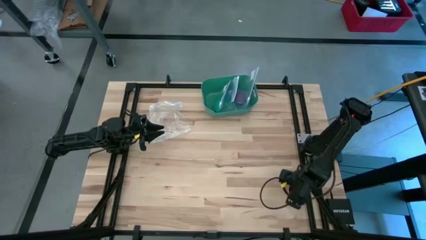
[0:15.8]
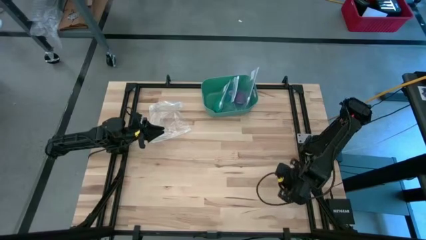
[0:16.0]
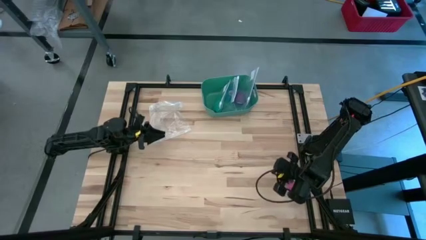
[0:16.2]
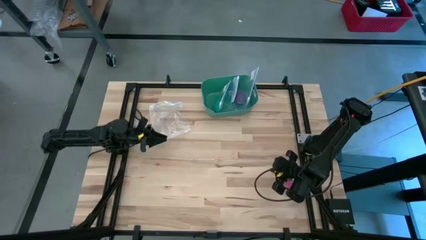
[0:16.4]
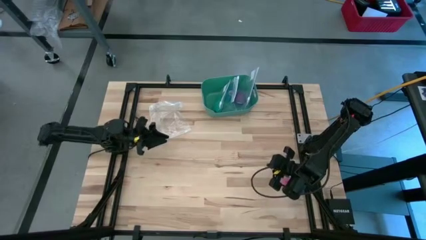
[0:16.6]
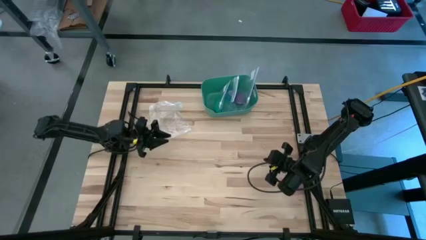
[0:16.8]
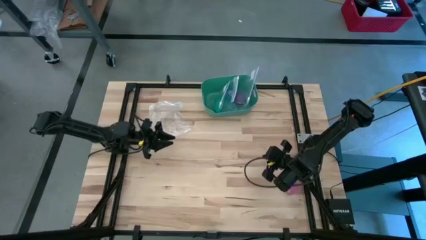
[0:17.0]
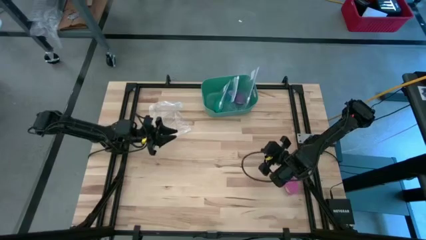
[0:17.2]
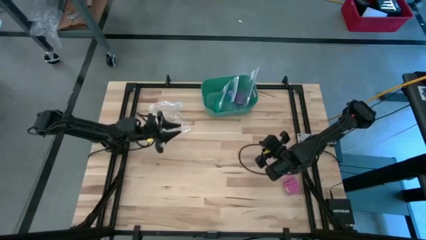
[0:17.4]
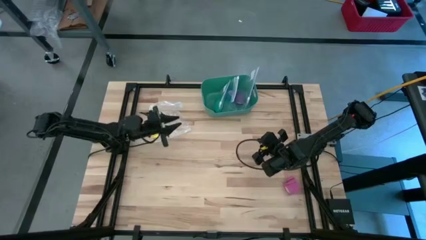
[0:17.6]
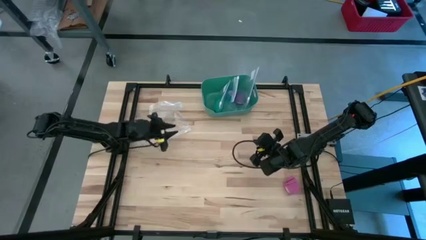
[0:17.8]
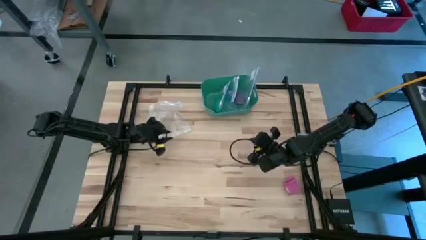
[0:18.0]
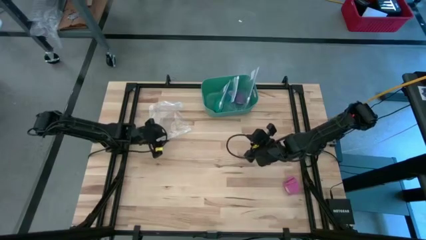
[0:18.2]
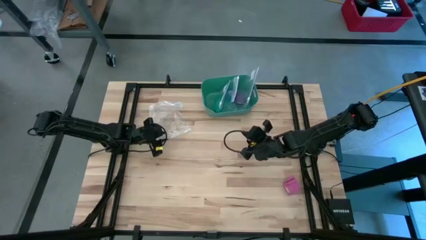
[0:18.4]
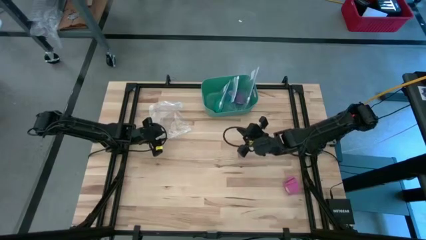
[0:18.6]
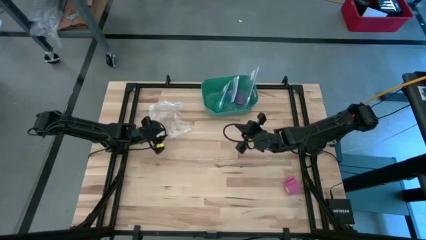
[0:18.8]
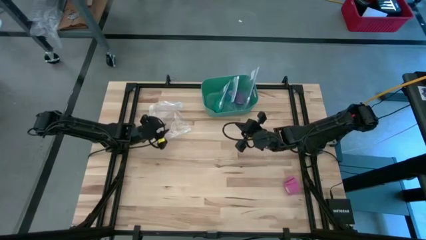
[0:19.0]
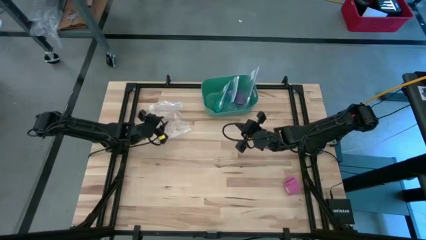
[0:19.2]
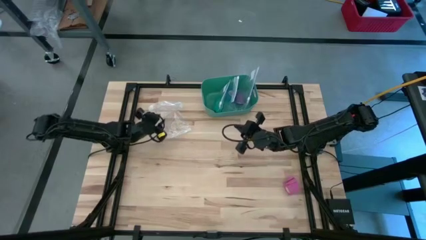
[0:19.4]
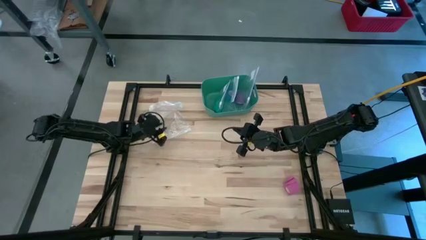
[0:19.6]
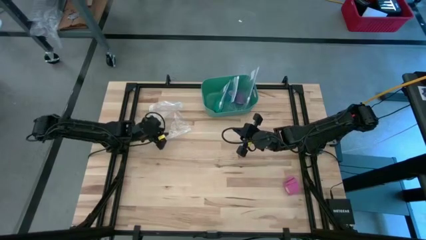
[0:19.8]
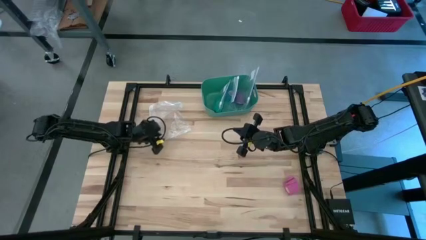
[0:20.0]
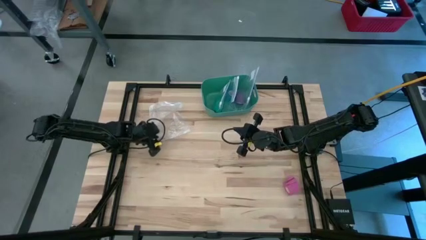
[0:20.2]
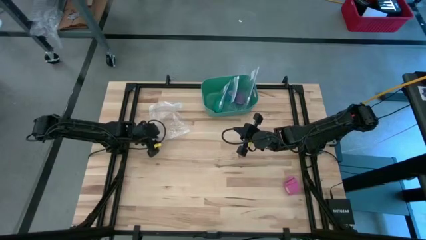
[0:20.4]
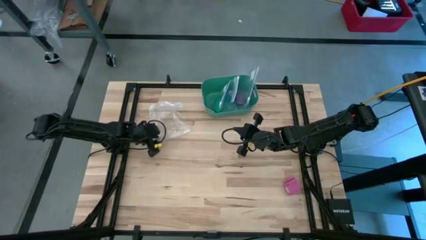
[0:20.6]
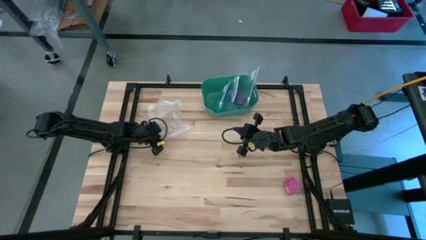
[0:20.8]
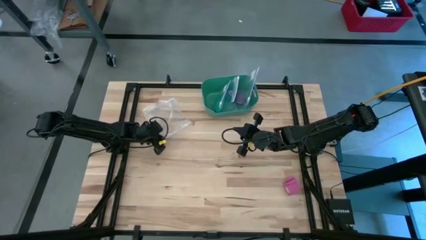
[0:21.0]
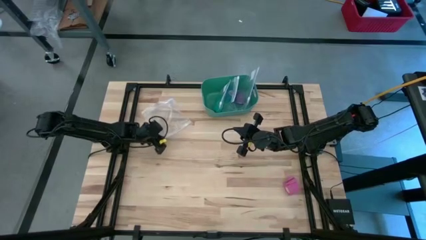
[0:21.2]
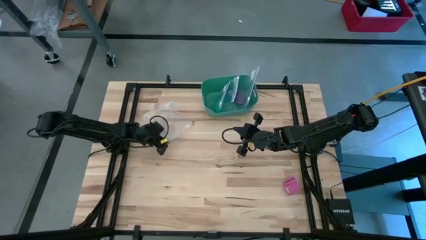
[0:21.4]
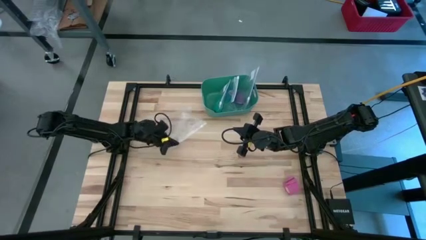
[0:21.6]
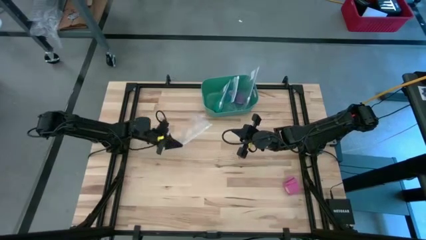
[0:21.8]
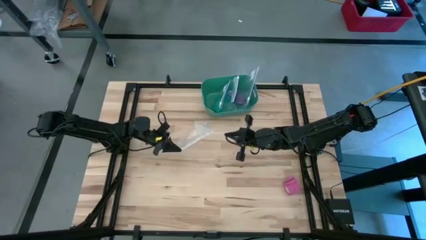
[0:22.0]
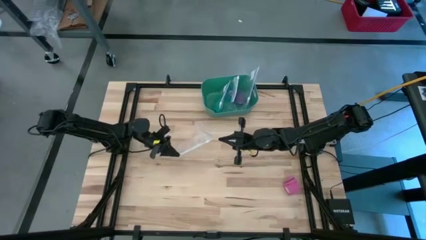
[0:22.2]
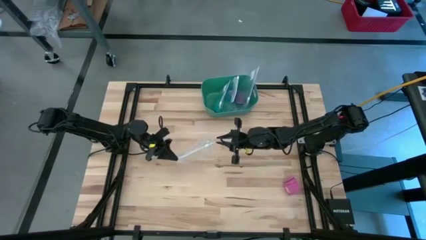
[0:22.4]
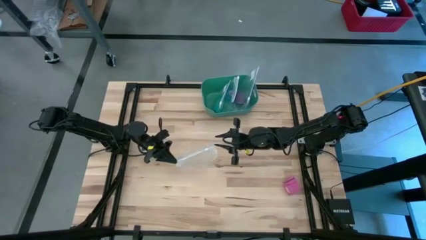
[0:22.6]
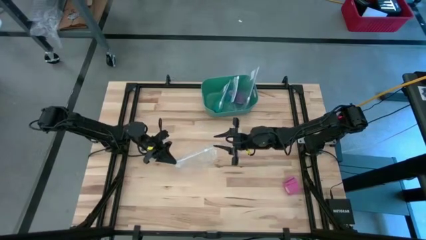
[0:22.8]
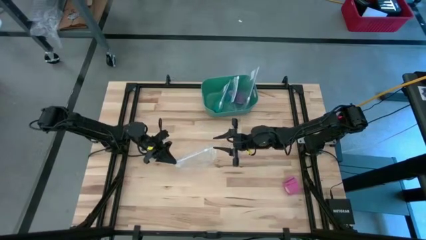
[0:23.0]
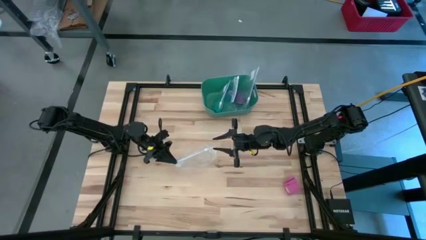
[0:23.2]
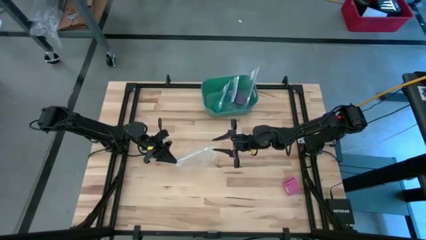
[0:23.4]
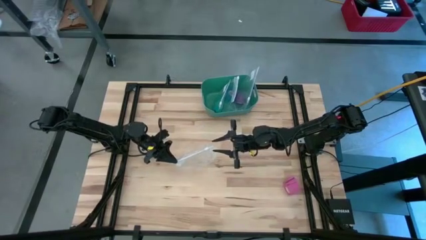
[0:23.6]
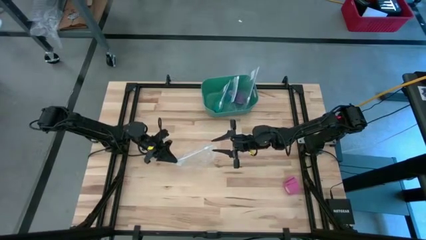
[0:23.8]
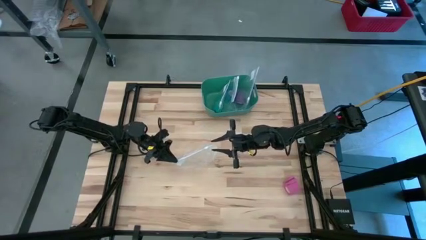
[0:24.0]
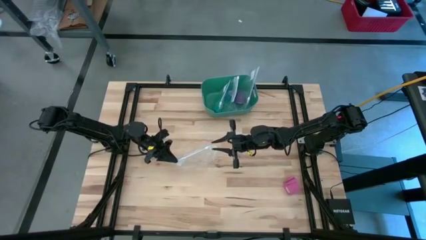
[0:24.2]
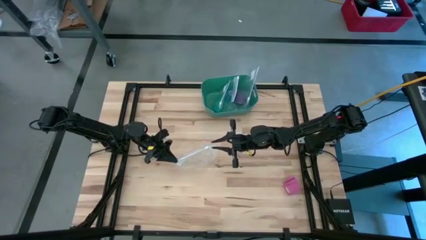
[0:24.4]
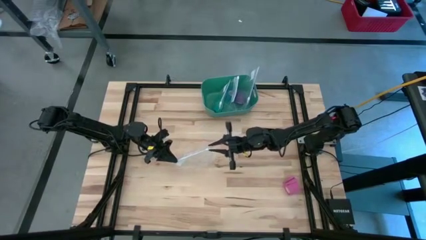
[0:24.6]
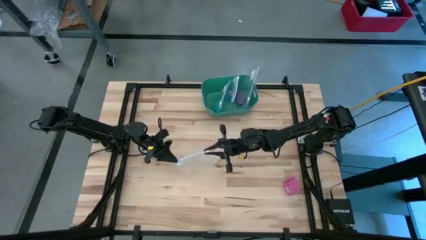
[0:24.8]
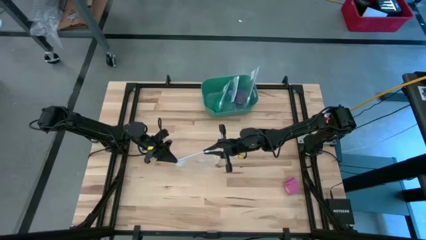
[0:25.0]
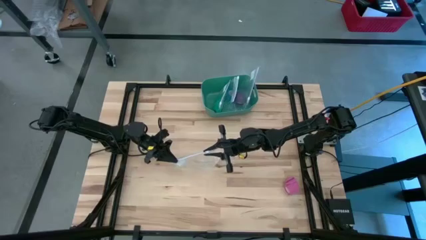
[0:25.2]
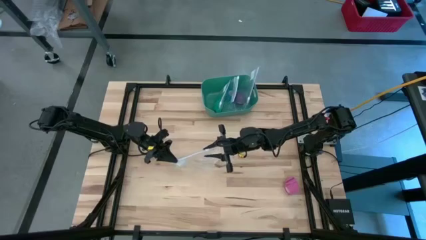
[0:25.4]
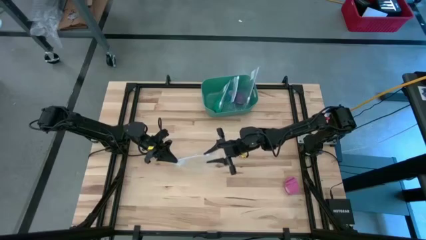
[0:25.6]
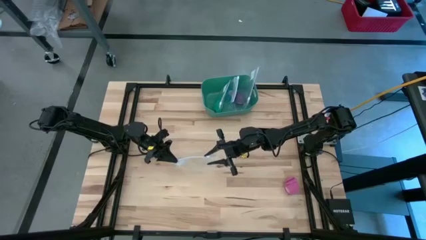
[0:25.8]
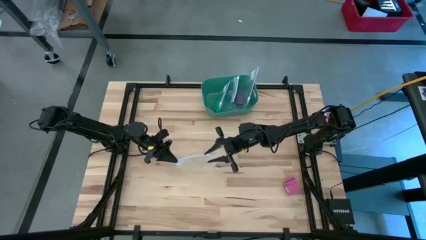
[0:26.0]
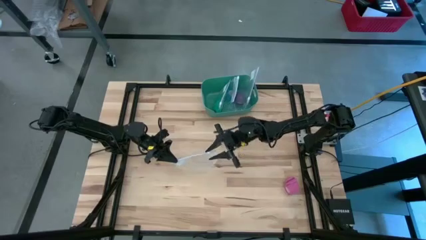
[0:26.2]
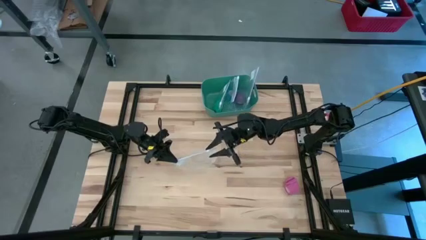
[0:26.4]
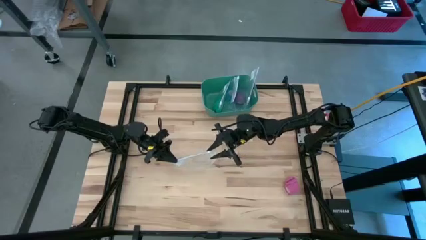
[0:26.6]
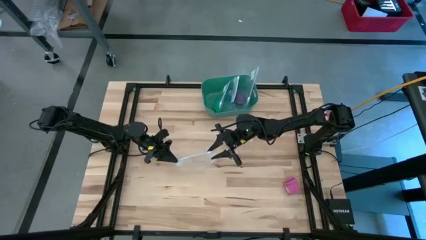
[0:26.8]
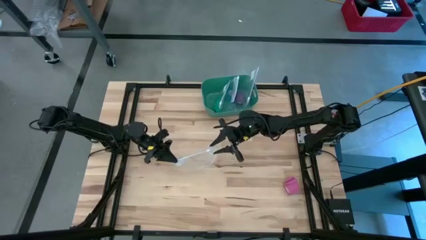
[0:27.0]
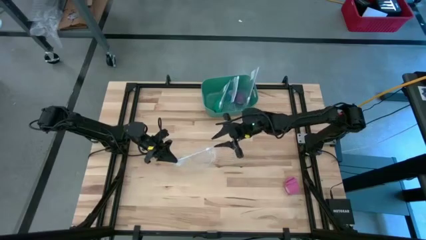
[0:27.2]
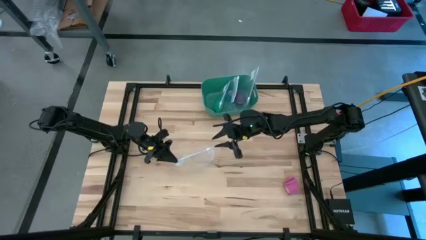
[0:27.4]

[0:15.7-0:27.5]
Task: Roll bandage
Open the transparent zip bag
